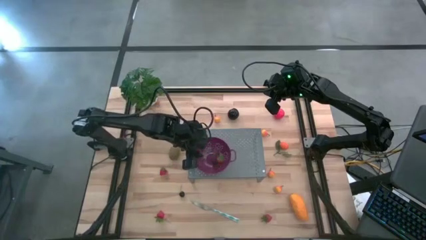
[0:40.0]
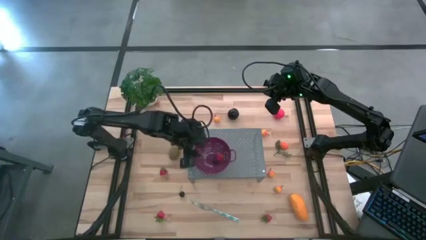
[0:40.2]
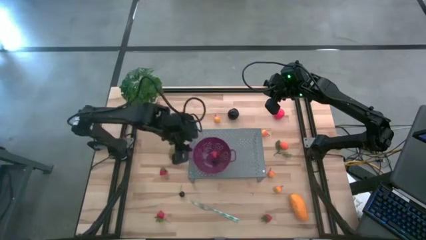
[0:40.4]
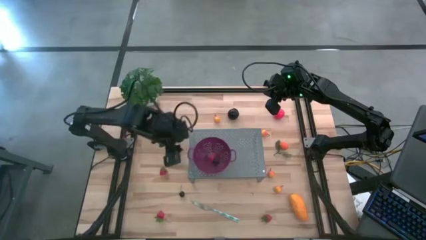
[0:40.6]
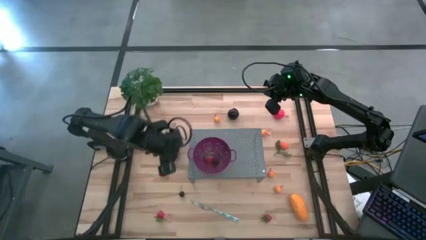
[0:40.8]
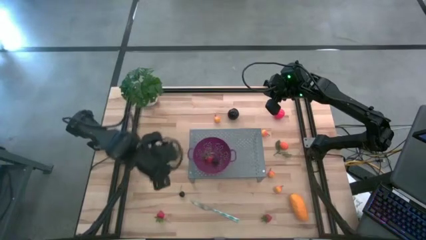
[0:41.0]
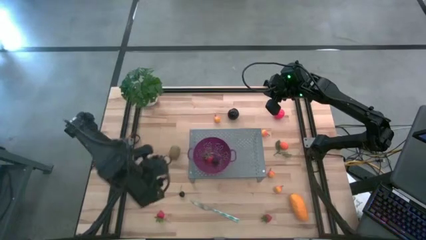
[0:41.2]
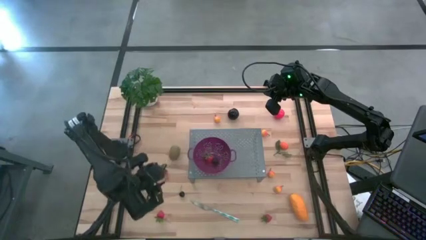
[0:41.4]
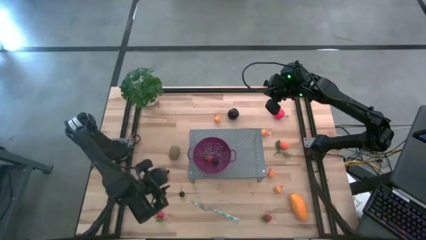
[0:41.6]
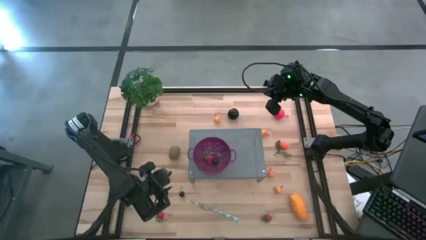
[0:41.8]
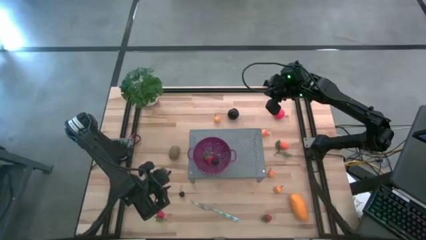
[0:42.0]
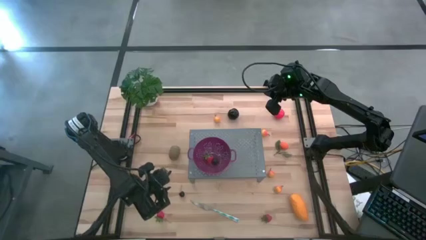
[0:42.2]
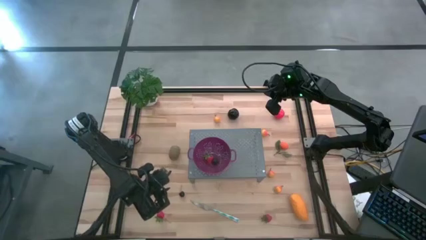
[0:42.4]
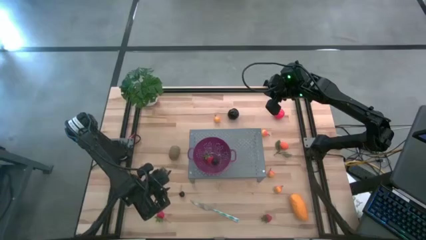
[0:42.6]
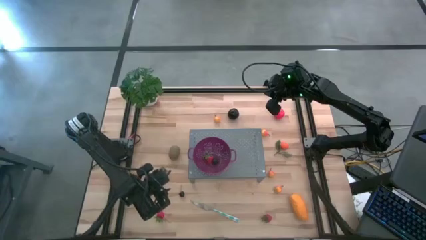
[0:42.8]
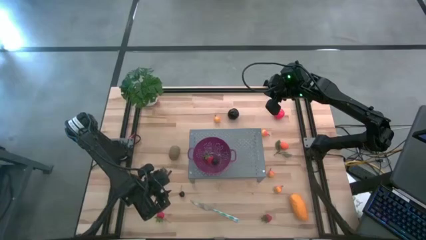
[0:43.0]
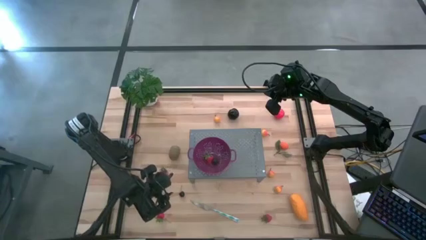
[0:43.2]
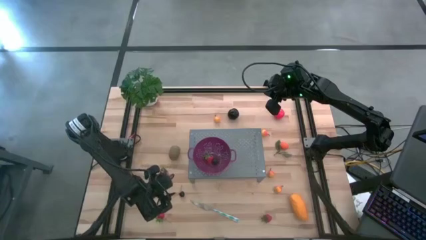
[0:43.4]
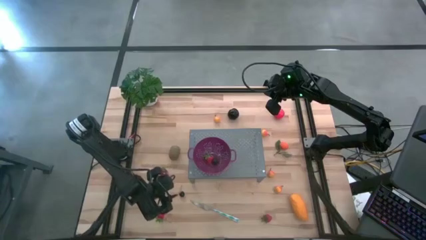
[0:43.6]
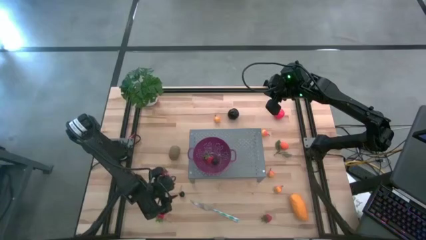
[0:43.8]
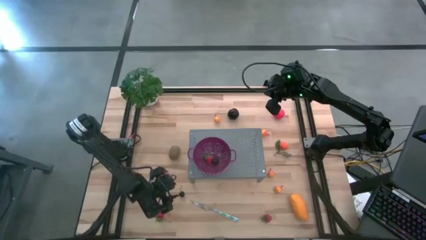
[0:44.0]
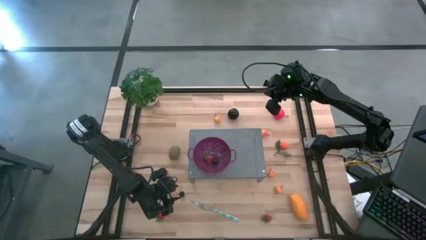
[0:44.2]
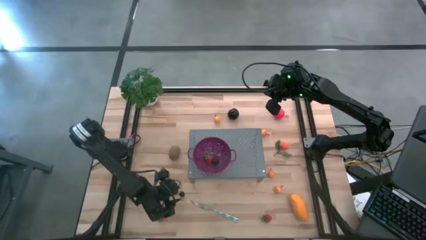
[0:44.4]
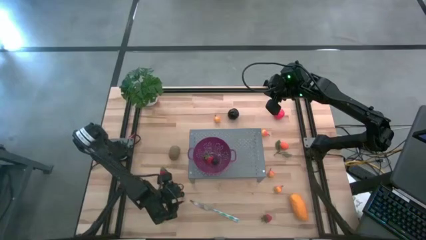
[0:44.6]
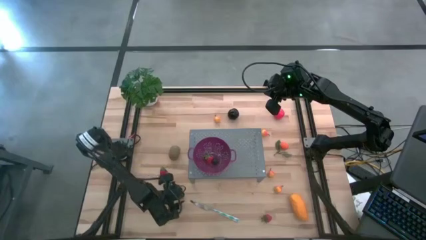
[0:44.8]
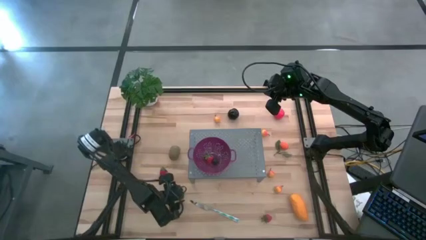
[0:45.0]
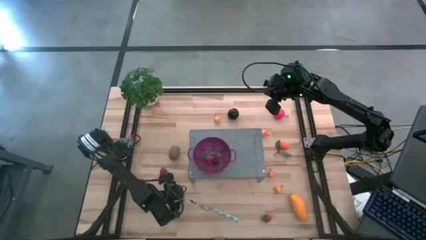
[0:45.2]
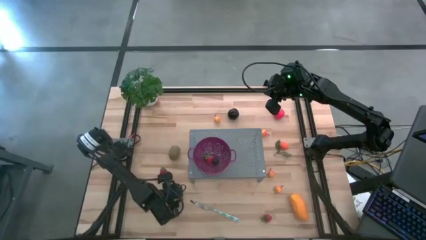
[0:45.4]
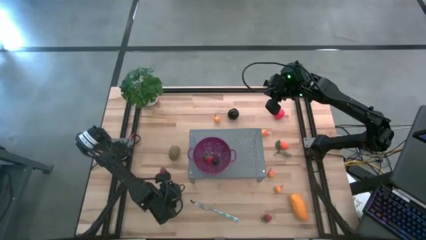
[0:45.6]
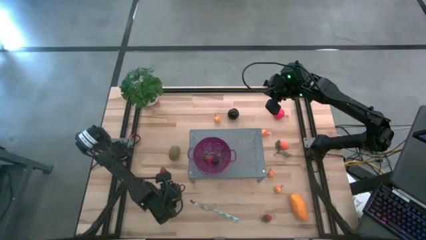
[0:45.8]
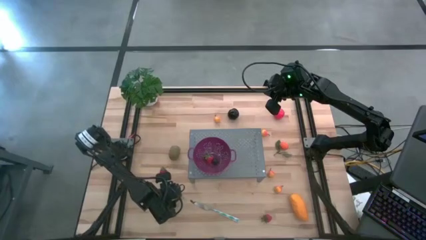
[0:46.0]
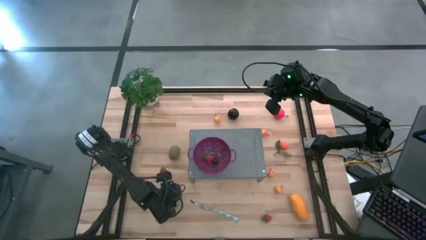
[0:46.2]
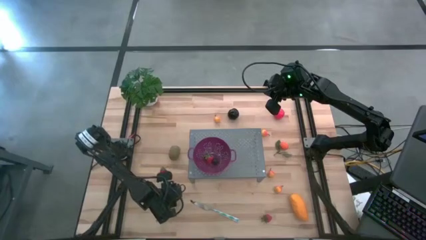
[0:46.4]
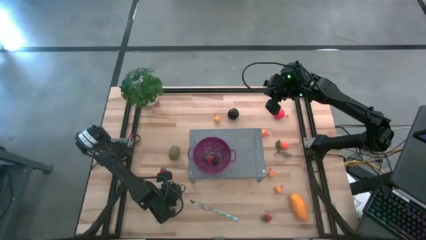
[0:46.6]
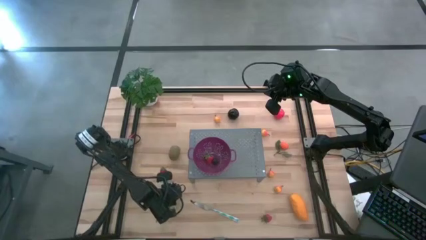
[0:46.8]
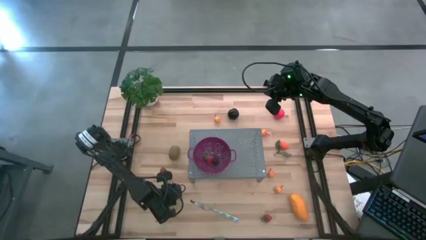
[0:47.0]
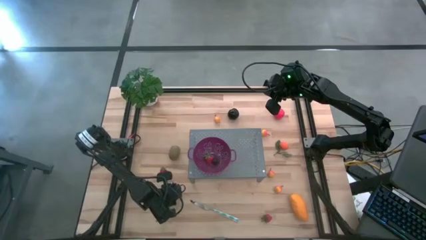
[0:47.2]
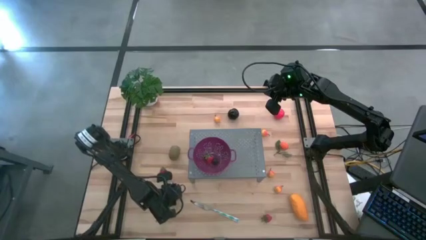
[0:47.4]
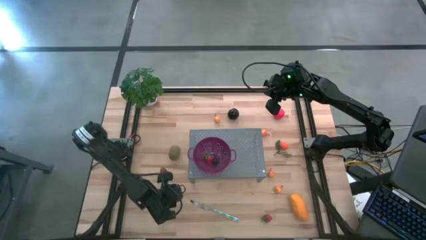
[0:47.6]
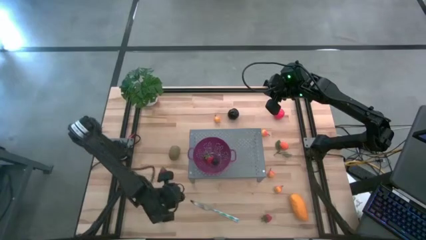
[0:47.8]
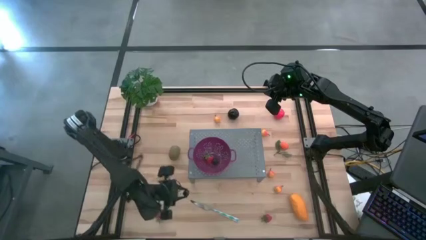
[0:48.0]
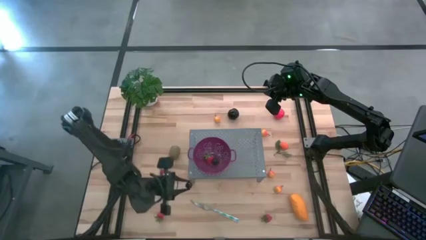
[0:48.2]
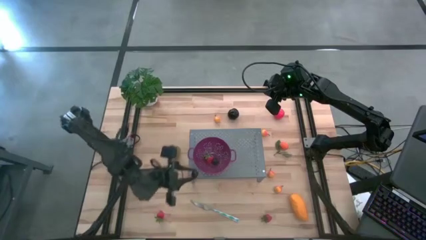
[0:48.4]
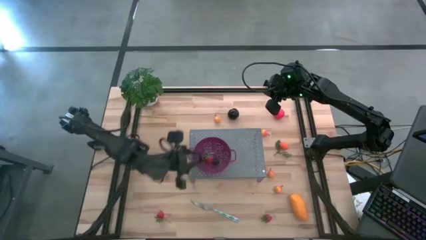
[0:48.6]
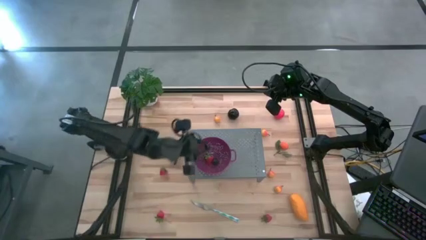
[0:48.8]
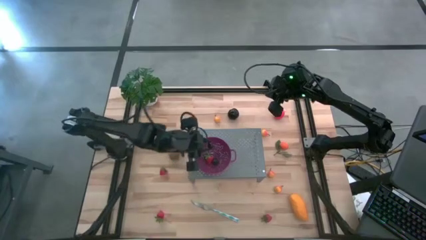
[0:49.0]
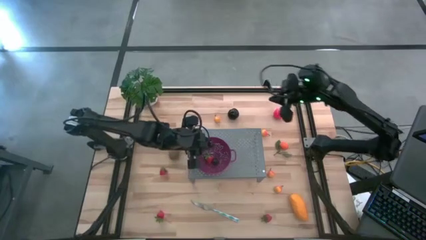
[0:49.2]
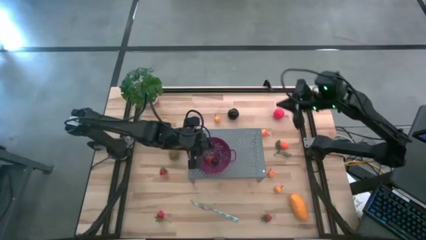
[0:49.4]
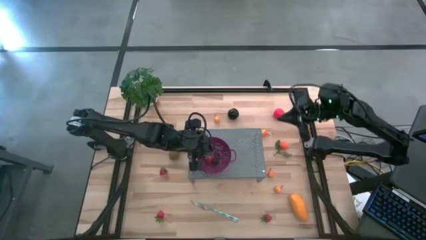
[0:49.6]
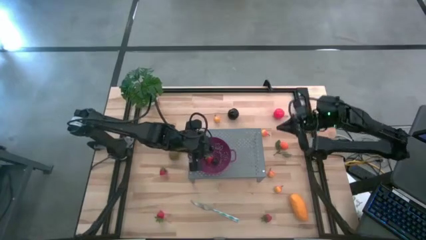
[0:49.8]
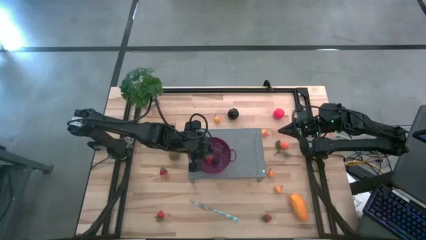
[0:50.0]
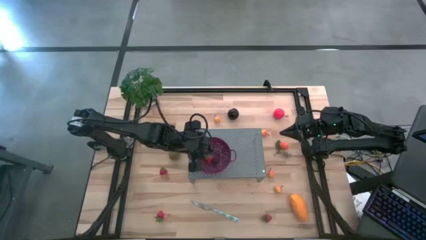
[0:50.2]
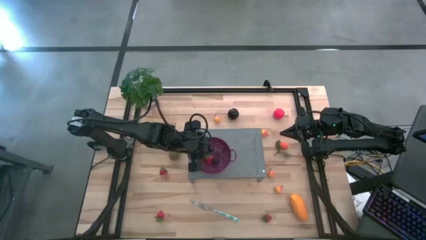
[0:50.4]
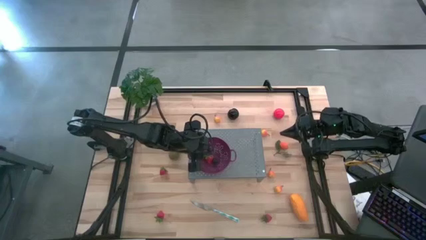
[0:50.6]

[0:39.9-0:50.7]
Task: Pick & Place Fruit
Put the black cherry into the purple strainer bowl
